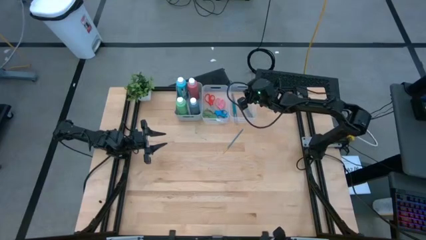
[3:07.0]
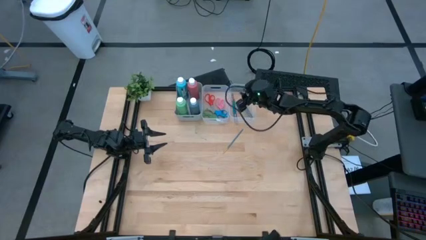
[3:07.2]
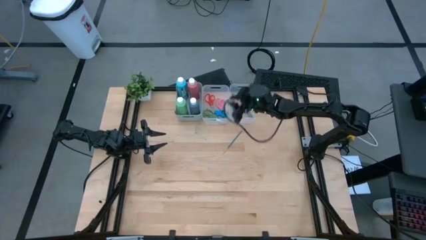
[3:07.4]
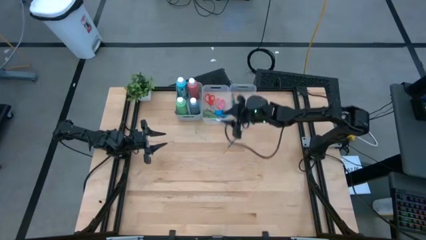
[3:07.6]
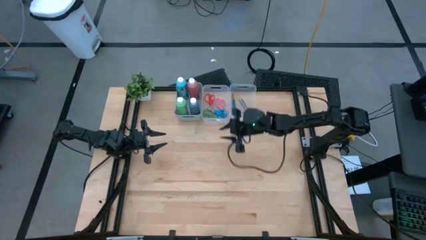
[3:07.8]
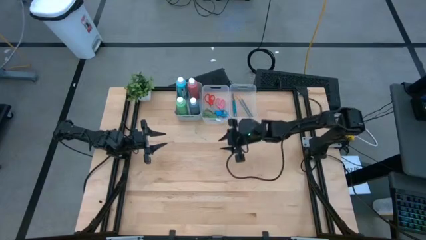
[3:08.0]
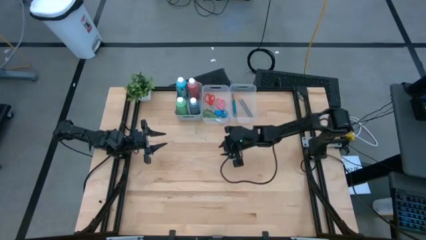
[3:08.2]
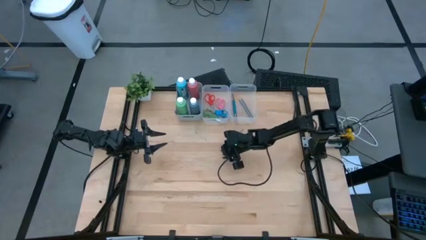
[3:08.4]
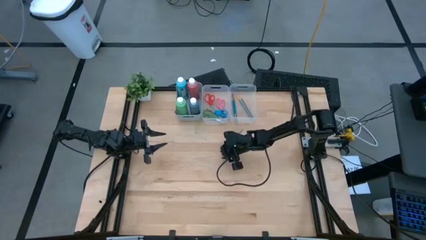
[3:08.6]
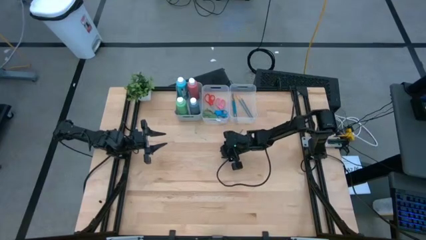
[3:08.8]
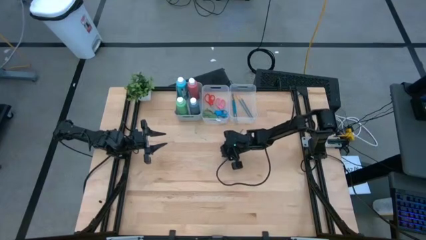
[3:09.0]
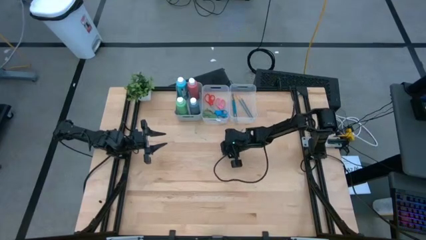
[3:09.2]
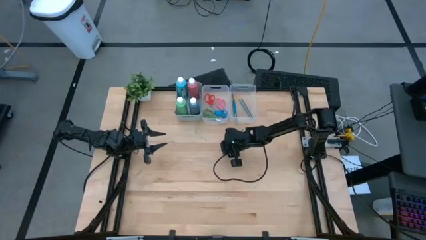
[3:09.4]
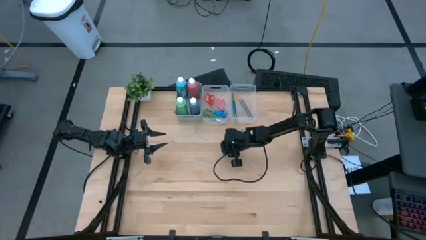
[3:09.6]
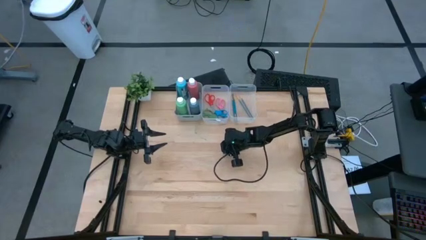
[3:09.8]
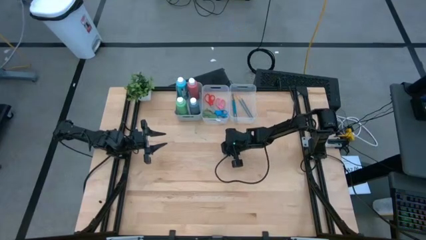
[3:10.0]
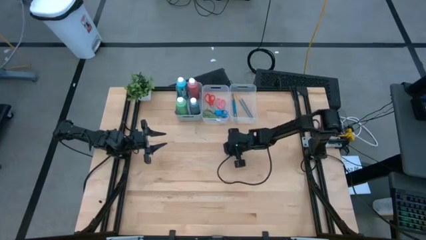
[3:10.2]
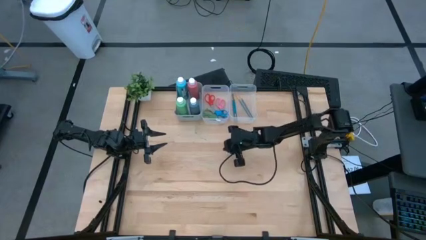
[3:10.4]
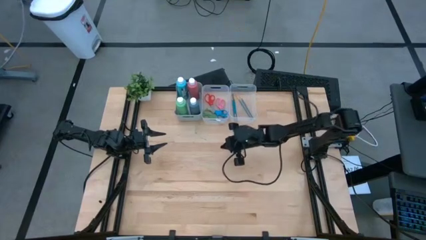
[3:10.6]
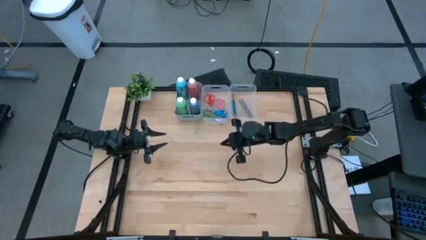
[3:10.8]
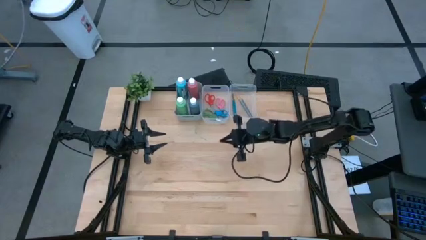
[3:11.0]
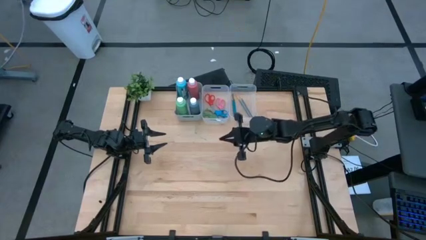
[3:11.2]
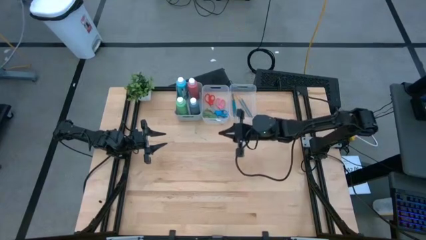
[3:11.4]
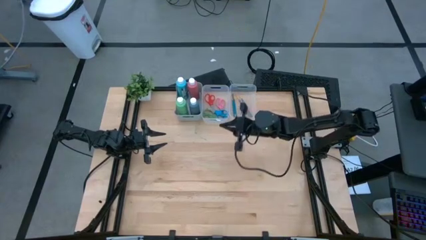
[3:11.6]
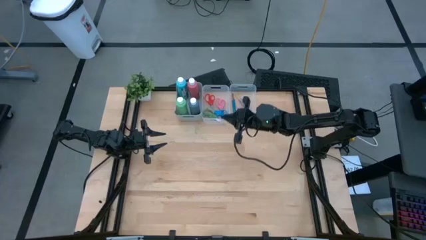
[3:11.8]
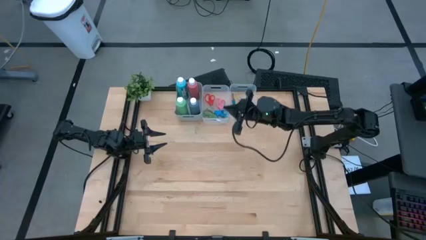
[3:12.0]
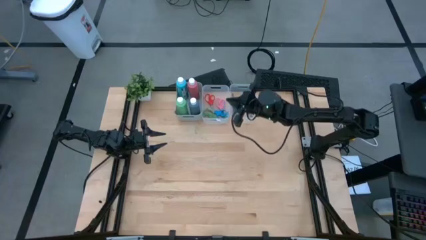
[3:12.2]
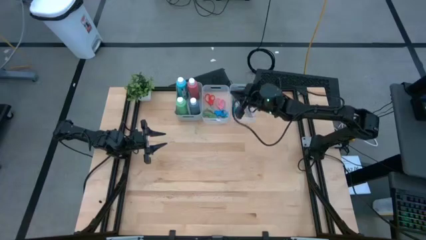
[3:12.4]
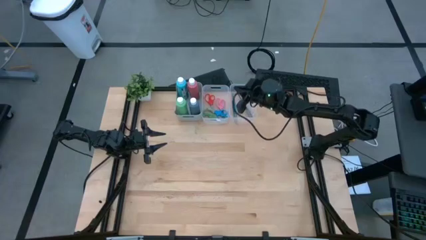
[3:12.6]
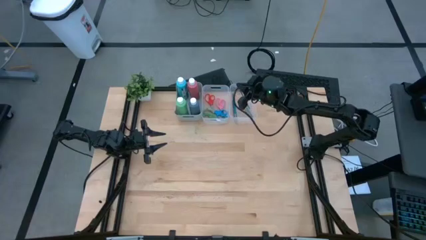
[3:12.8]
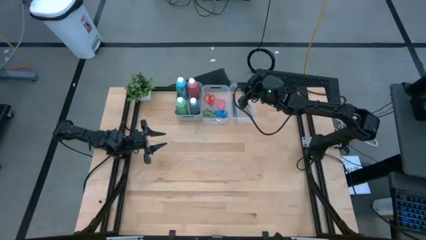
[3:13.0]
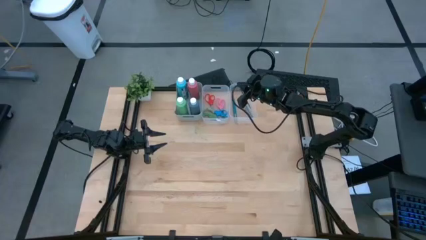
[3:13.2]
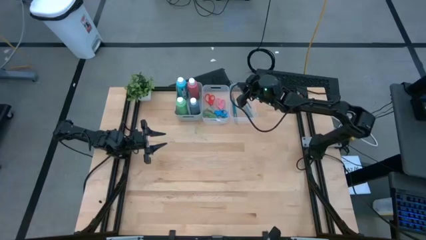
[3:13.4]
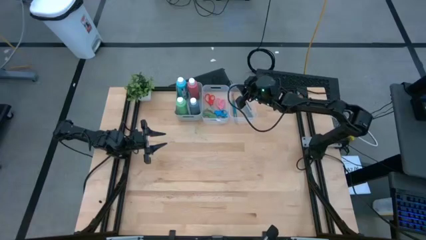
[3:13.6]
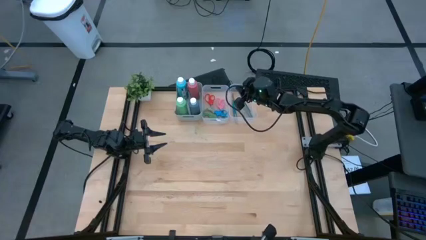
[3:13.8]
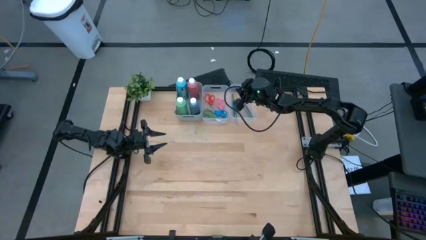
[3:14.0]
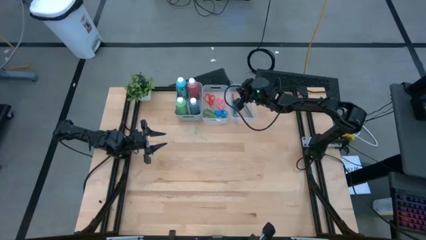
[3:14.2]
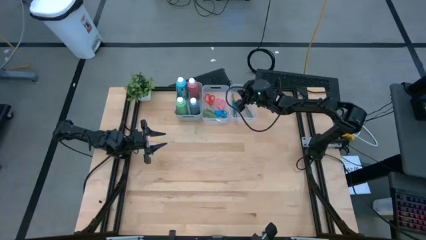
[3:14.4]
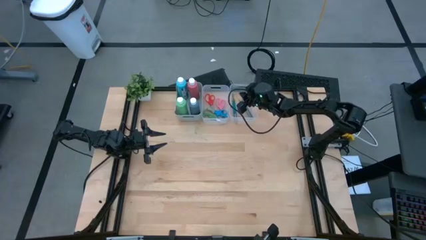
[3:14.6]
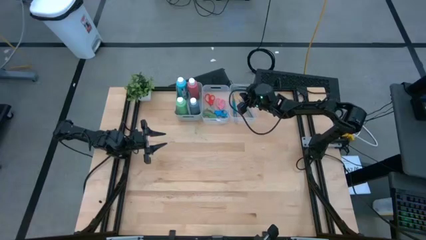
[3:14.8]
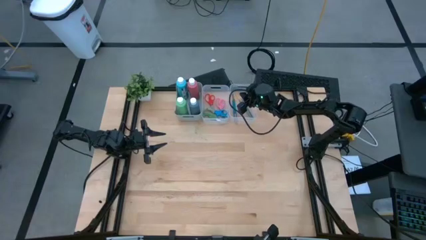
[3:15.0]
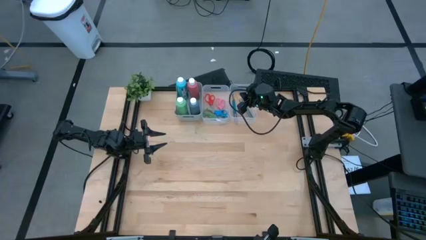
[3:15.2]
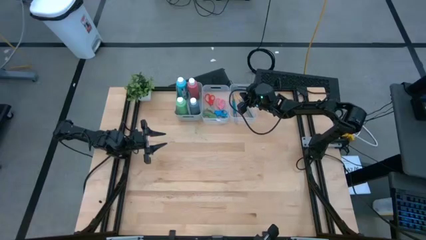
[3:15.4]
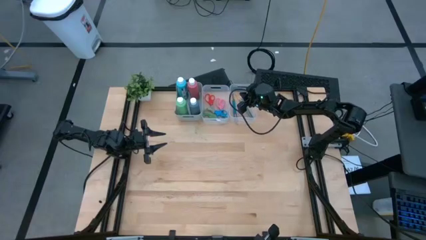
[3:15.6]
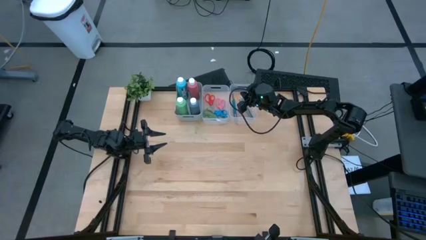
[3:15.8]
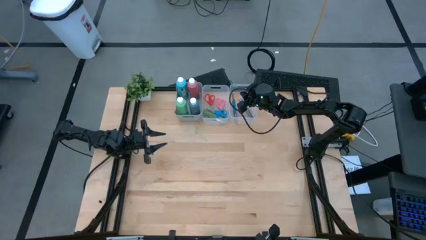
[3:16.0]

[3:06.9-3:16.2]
Task: Pick & Place Paint Supplies
Put the blue paint brush into the right transparent bin

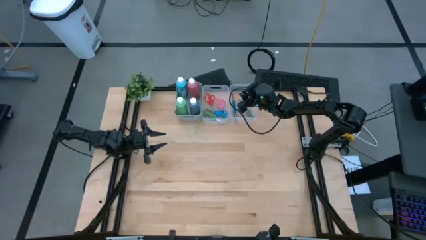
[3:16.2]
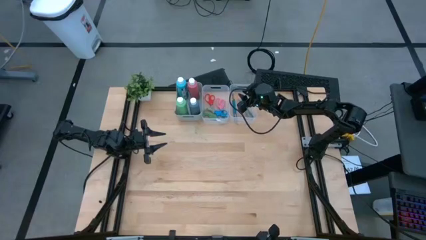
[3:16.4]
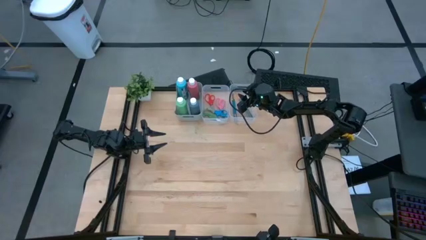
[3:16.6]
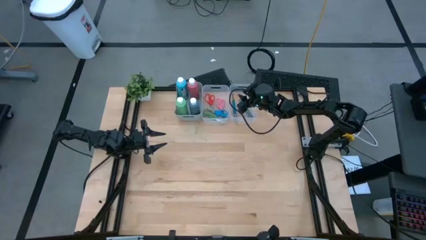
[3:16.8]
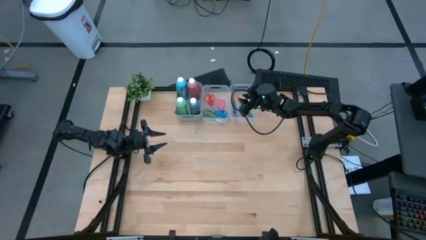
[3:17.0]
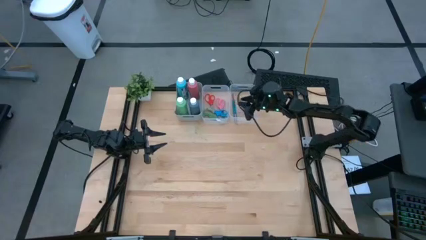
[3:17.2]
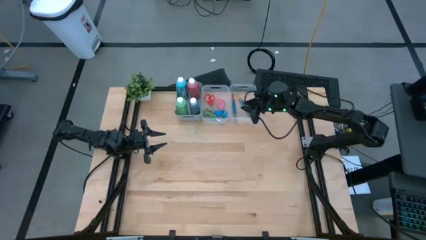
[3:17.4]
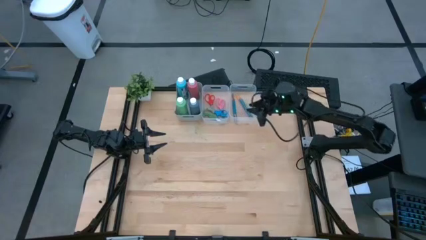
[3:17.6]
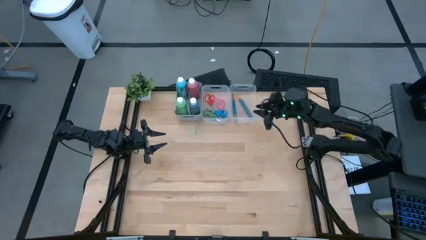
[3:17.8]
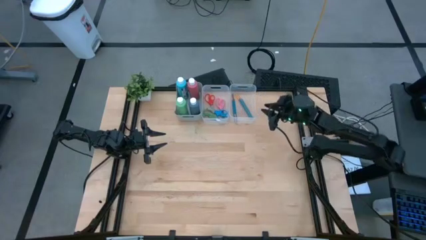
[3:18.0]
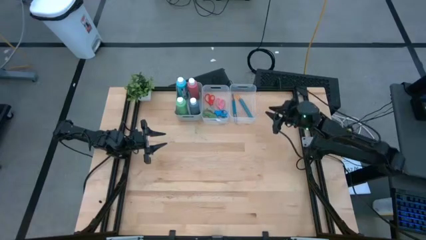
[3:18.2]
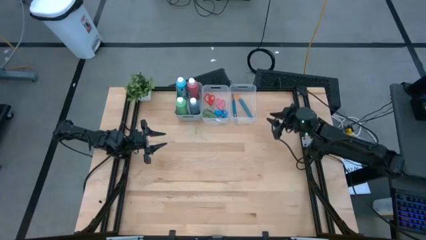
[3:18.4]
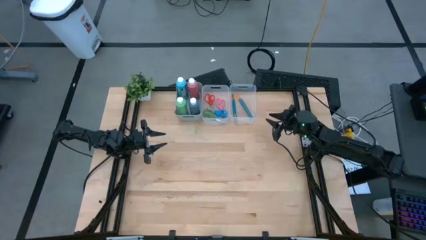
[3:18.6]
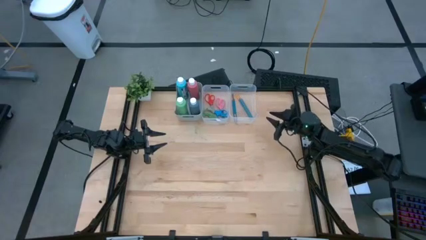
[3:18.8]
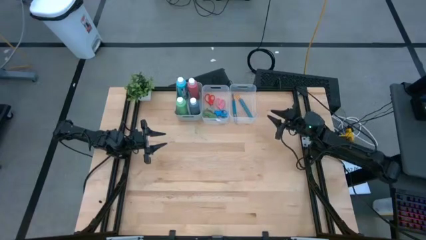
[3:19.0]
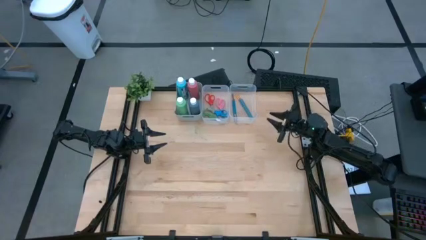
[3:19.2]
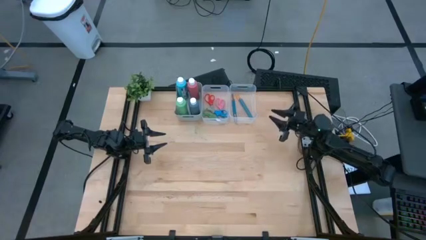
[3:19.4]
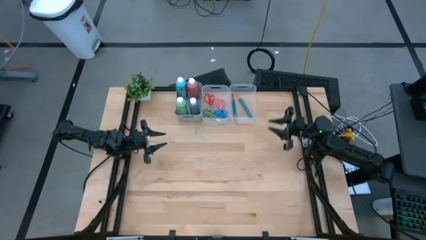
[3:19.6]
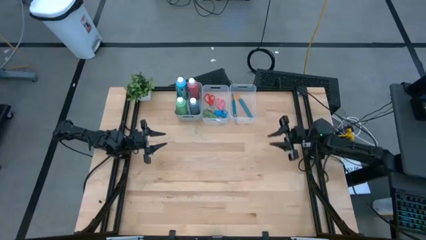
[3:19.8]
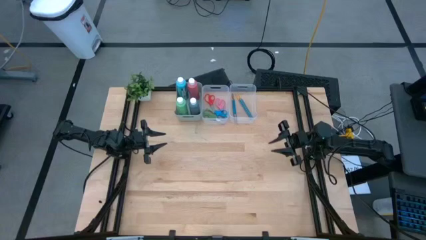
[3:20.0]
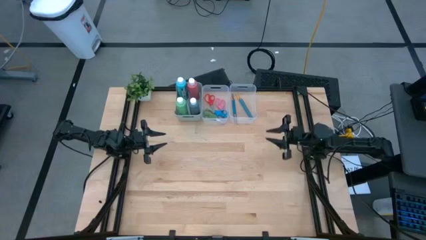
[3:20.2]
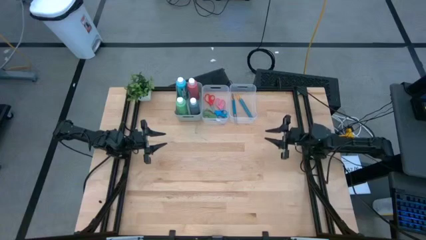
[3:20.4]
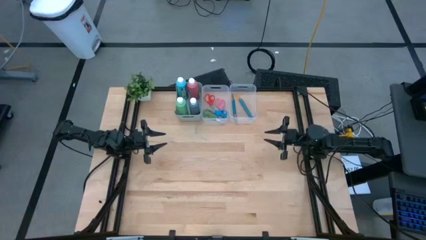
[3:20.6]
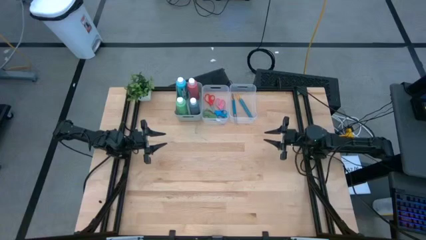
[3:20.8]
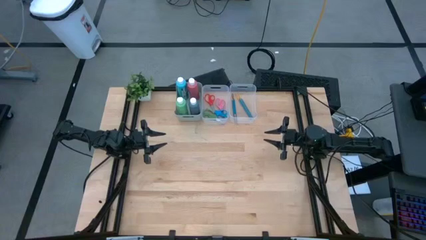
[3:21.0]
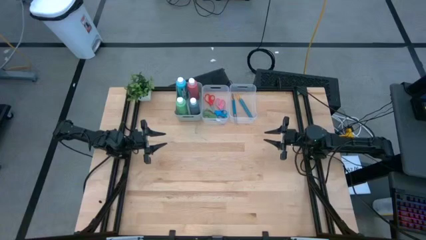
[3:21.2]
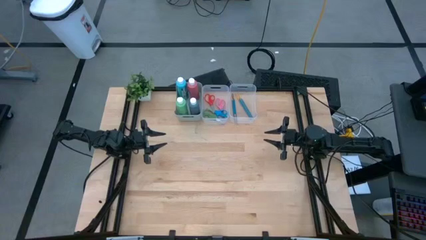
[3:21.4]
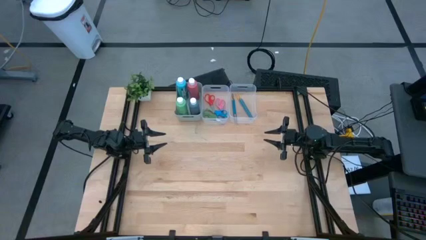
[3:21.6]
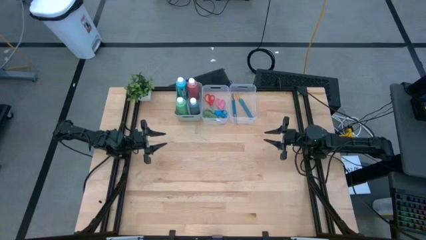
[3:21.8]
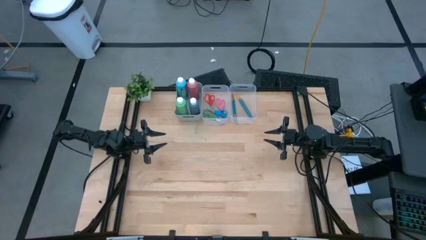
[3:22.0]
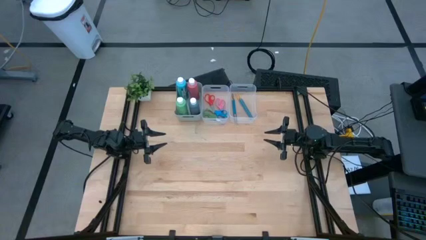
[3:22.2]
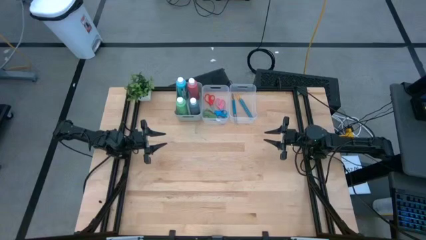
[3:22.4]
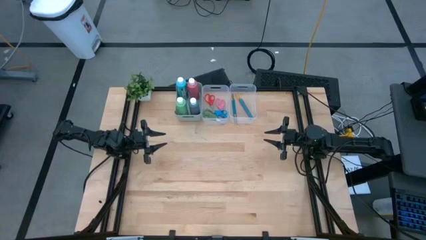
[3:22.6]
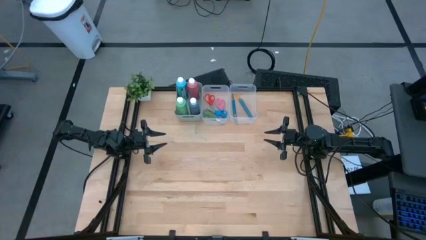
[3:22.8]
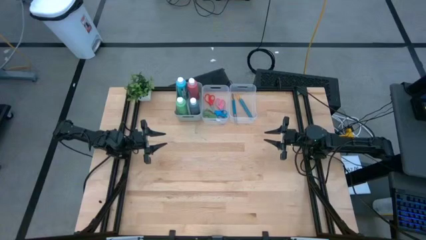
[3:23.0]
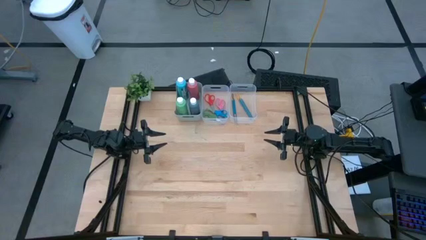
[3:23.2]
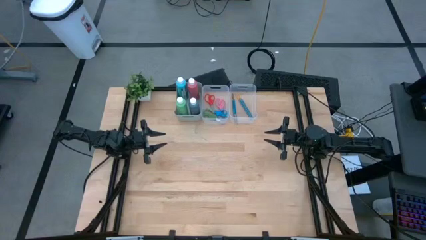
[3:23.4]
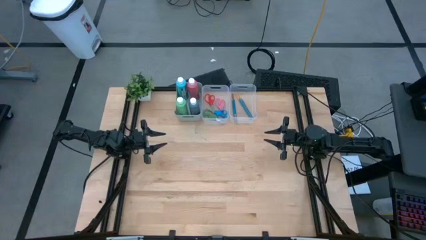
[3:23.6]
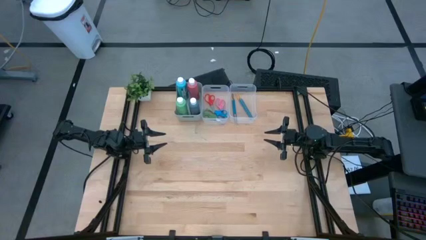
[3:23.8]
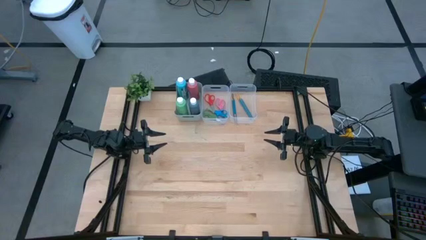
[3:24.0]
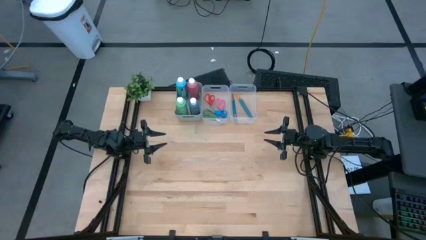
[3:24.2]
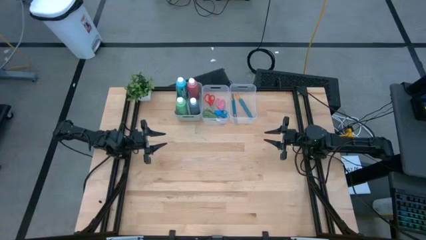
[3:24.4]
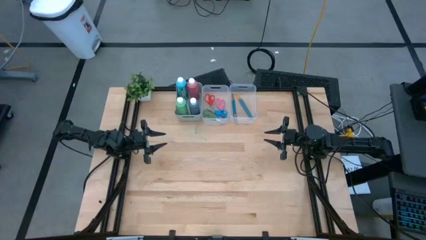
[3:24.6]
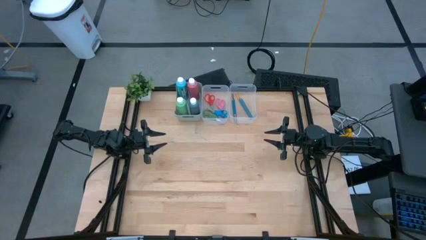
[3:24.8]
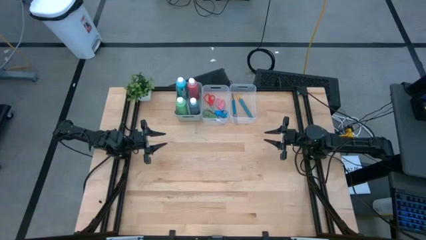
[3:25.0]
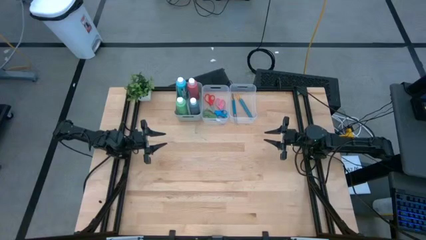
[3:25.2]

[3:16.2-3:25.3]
Return to Home Position
